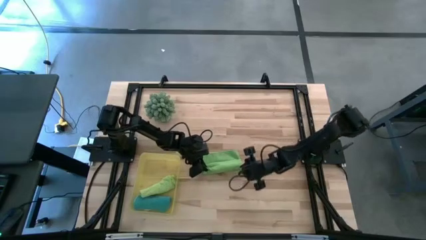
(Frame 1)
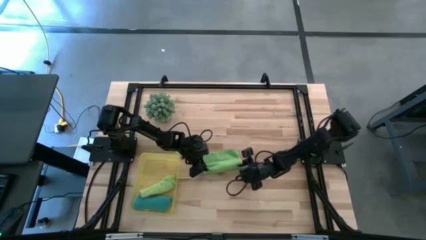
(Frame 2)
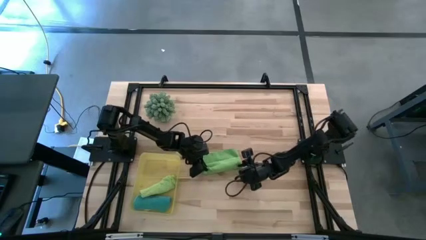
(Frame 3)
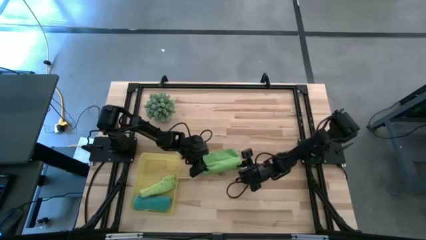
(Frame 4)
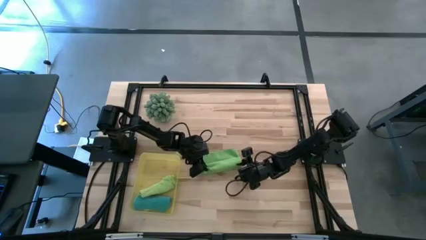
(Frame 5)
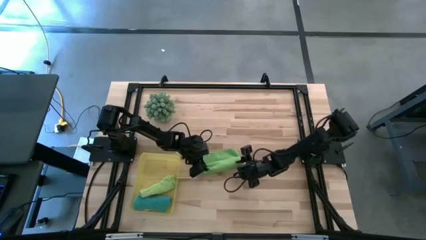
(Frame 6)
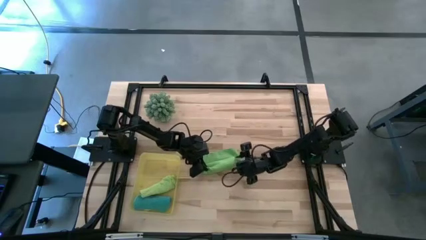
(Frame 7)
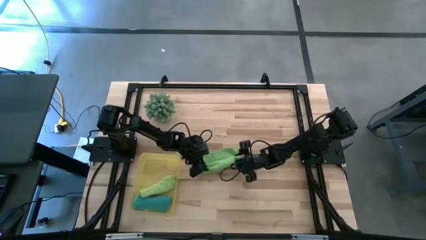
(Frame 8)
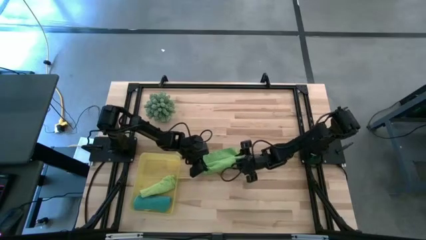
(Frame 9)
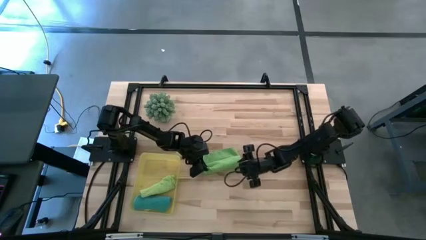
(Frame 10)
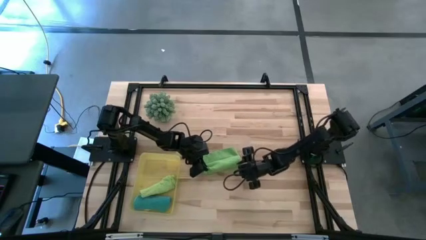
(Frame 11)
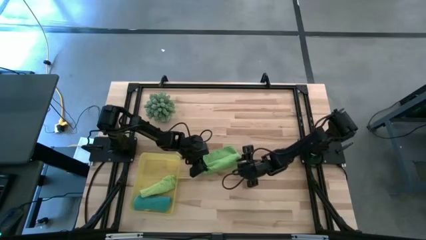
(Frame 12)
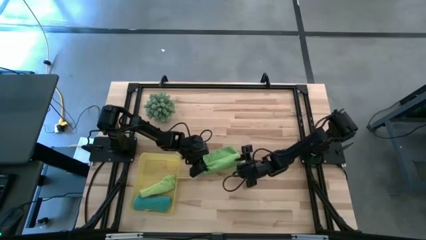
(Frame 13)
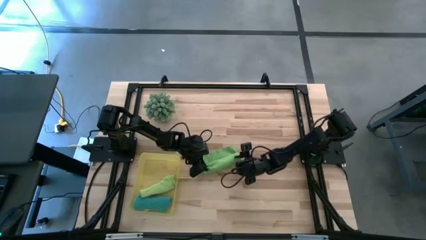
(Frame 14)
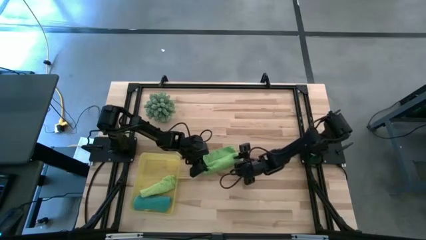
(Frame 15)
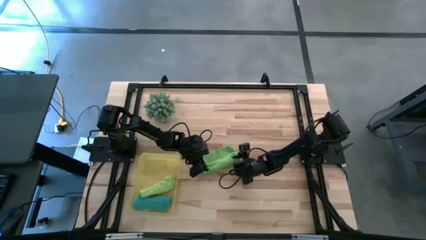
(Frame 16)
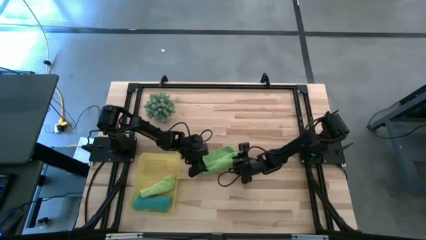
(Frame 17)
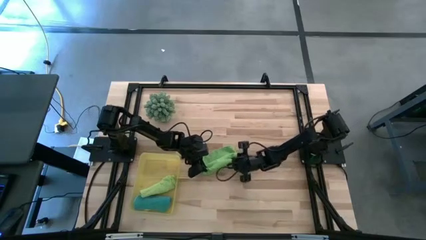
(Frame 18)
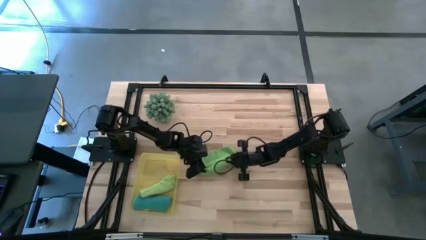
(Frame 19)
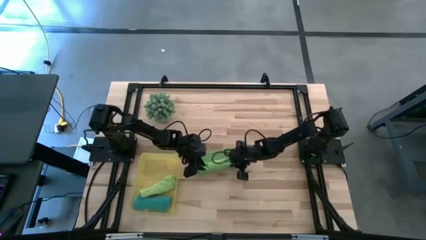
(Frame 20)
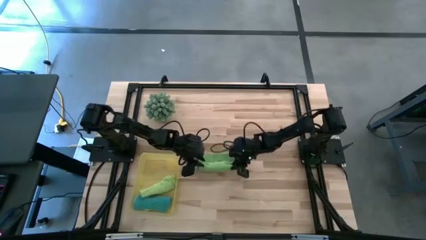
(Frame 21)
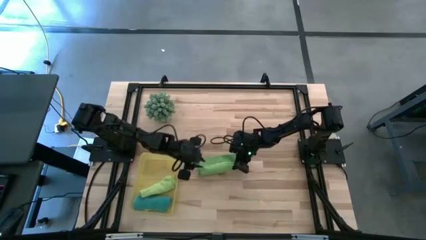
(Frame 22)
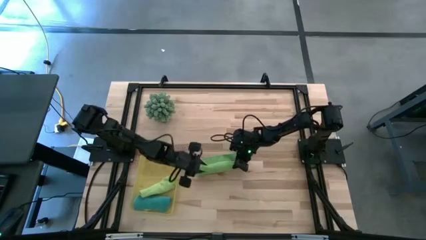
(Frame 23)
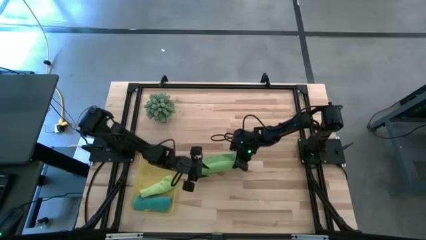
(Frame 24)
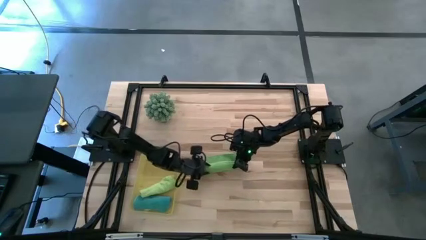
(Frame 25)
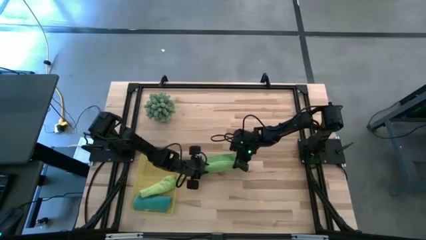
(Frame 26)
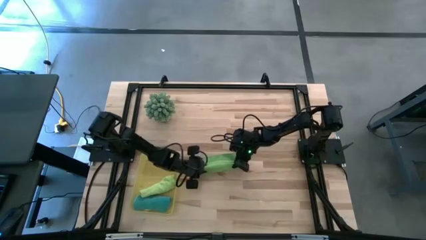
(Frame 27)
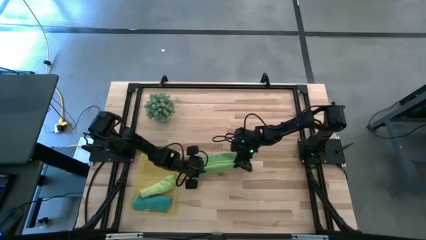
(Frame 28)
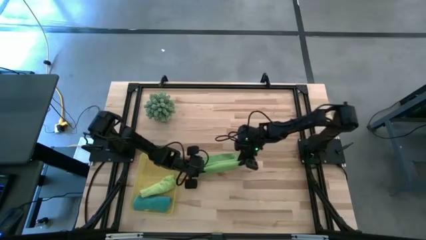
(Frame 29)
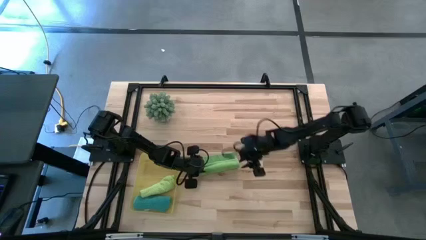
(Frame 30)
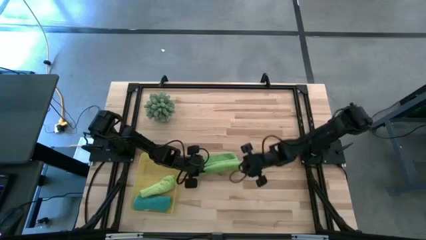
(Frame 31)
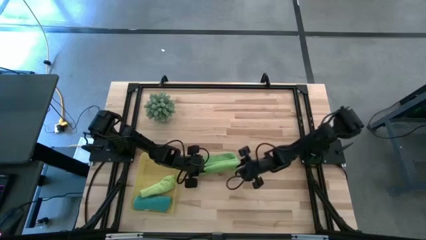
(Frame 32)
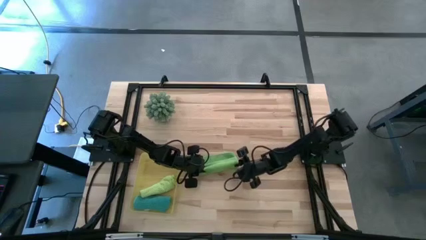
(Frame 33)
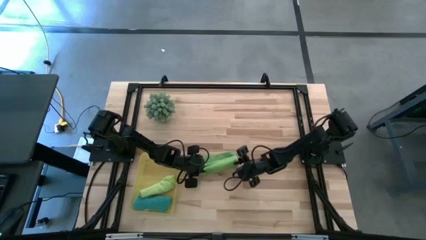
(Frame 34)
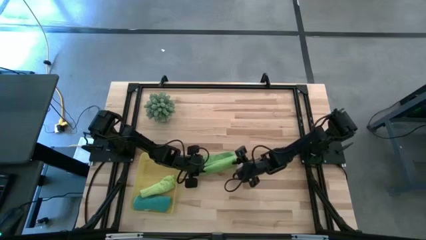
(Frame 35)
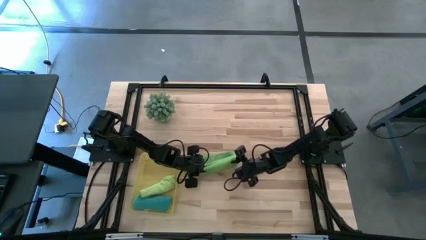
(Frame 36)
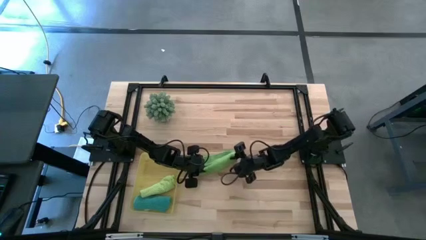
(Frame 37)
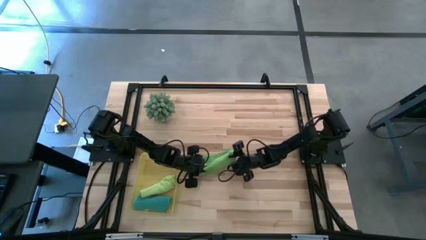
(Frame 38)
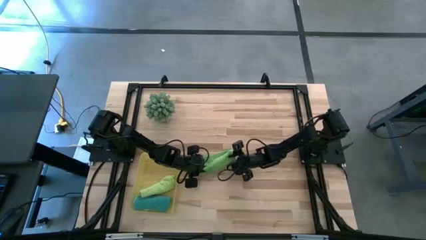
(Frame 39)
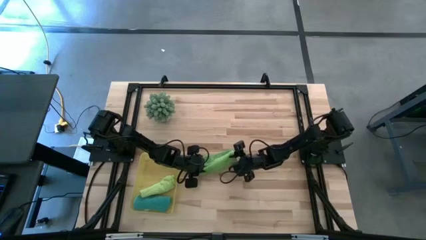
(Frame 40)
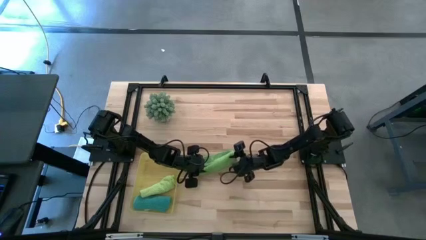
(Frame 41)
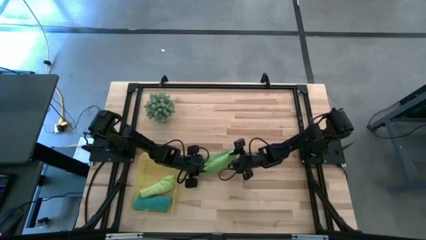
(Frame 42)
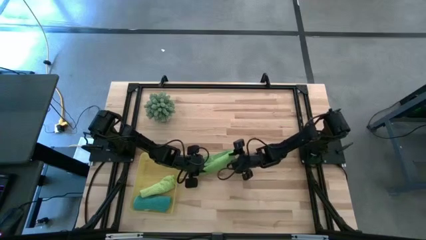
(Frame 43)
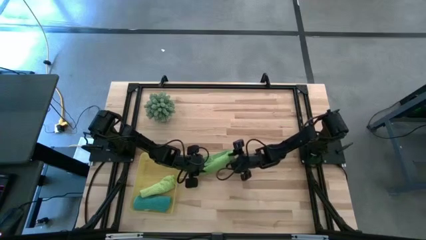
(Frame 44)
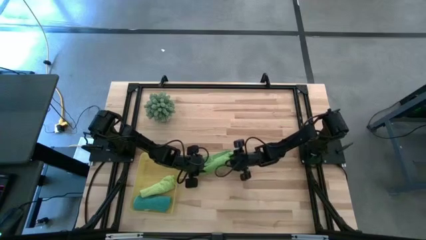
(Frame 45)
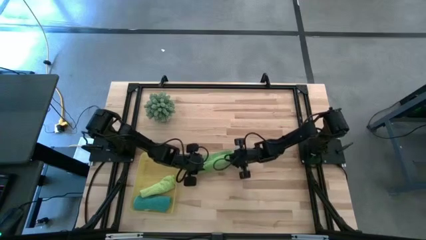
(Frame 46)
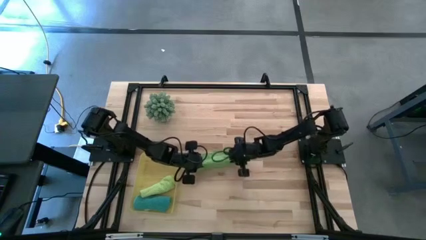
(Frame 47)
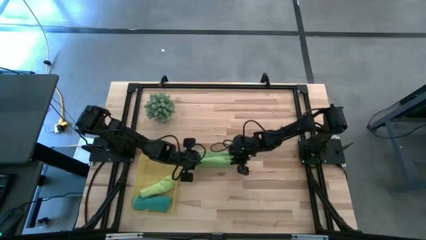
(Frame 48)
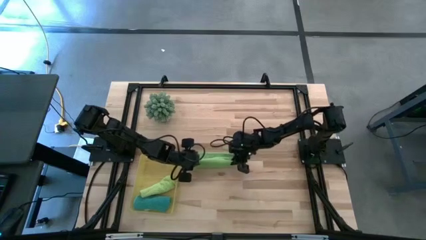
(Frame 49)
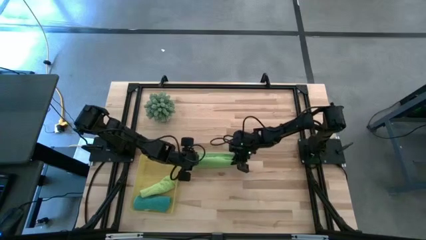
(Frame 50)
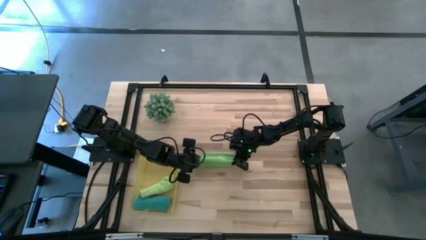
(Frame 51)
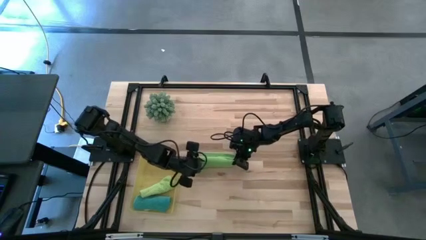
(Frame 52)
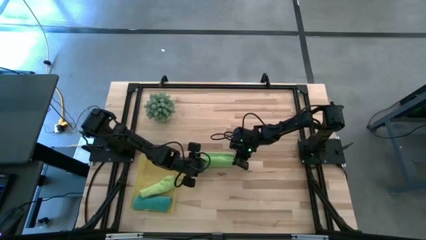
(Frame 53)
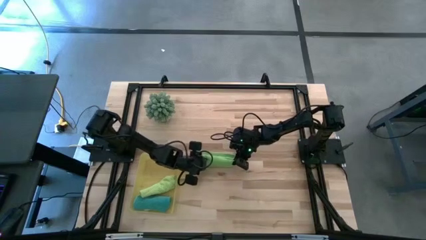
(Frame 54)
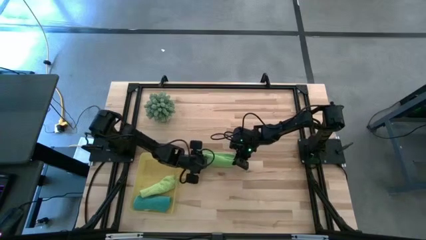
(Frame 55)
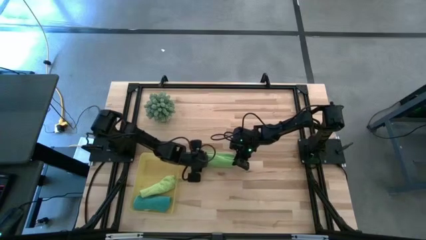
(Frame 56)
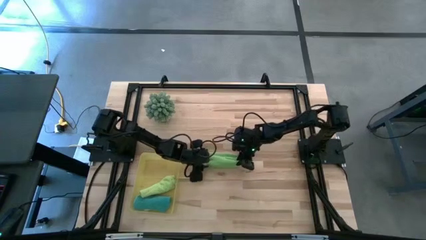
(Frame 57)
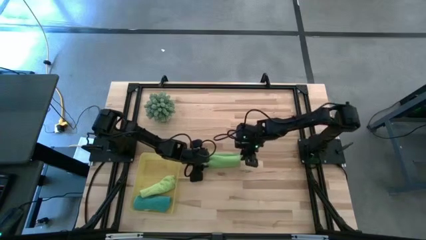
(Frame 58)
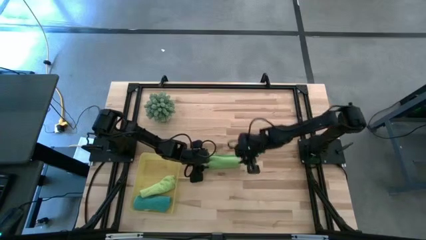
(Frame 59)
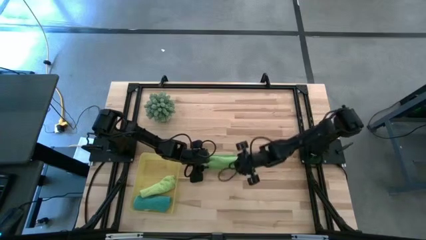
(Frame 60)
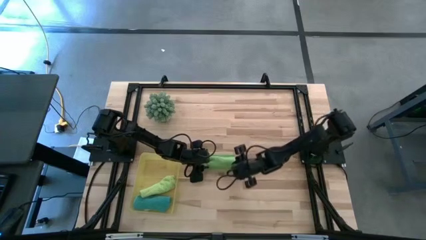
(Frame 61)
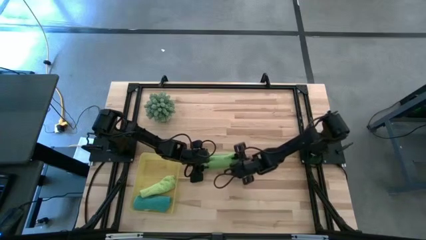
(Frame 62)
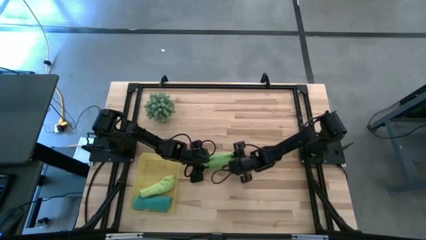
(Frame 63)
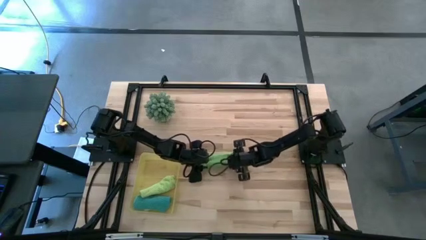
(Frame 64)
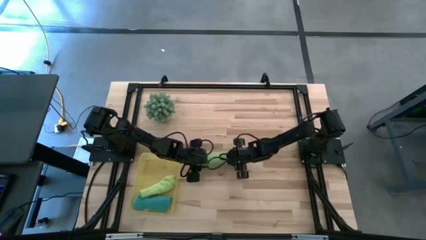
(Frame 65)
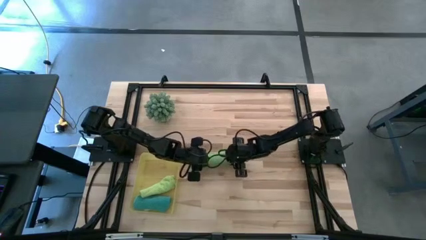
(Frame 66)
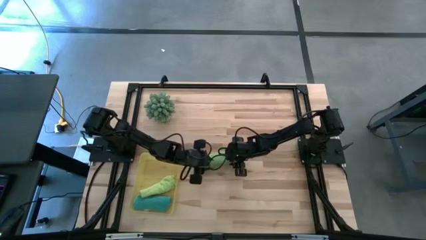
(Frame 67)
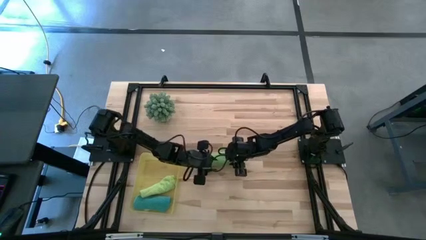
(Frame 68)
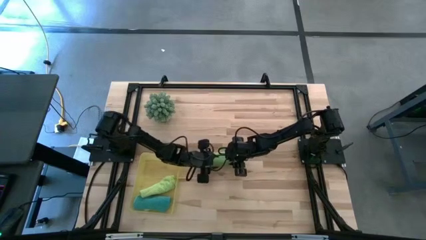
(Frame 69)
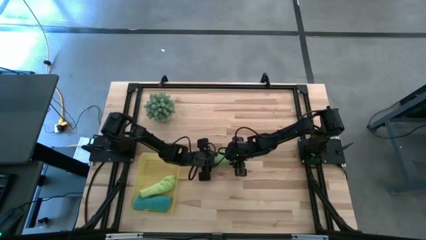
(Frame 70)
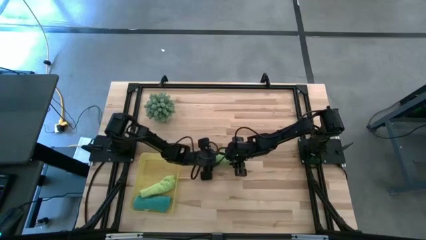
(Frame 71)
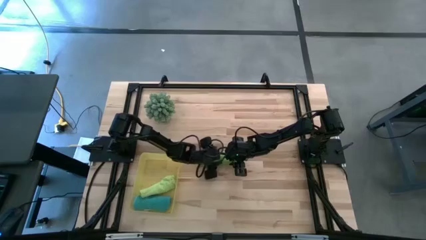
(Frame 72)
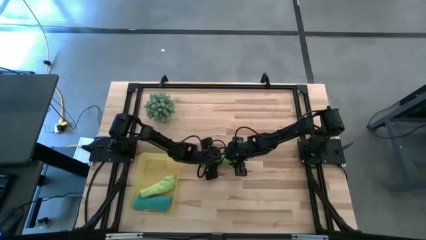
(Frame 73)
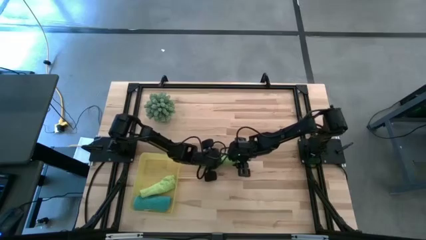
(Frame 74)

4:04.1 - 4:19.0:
Task: Roll microfiber towels into tight, uniform cylinder then place into a basket
Roll the green towel

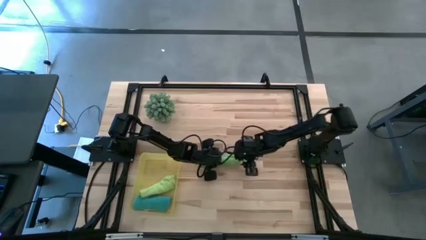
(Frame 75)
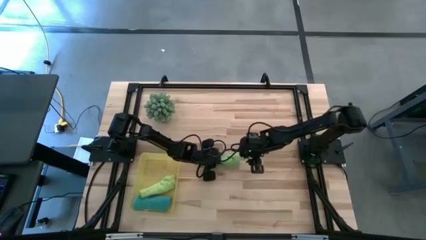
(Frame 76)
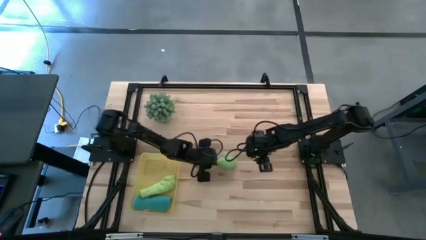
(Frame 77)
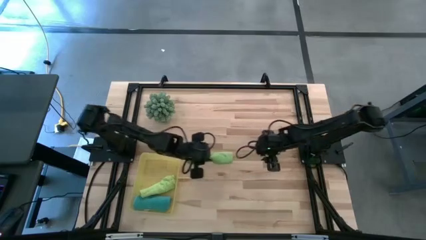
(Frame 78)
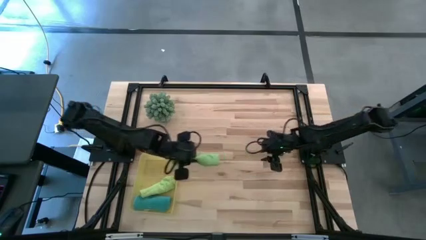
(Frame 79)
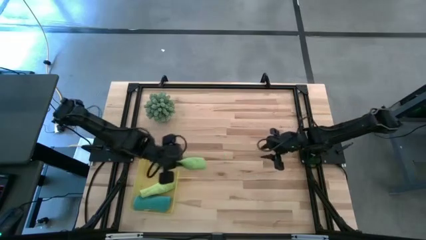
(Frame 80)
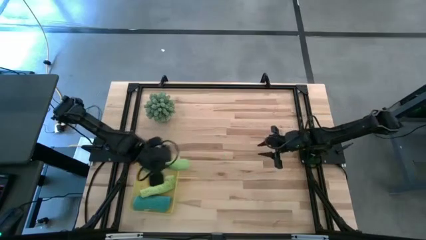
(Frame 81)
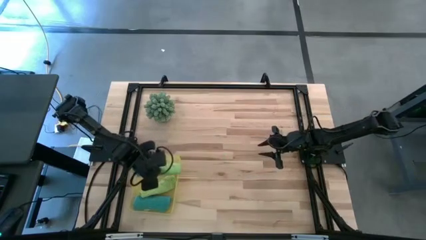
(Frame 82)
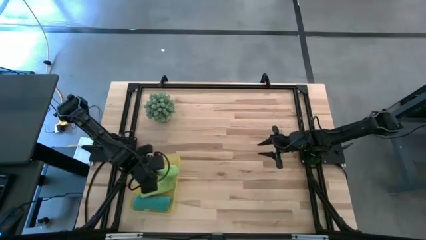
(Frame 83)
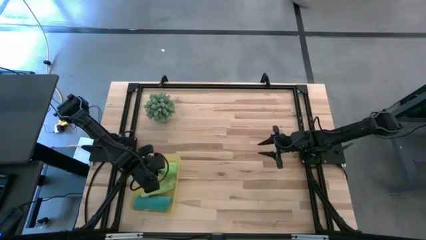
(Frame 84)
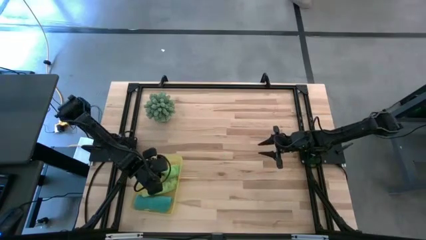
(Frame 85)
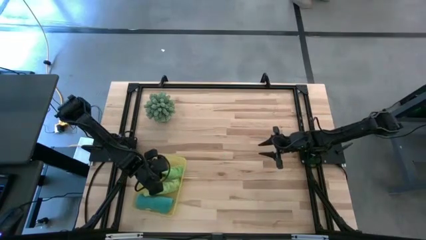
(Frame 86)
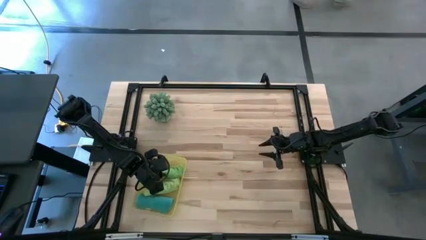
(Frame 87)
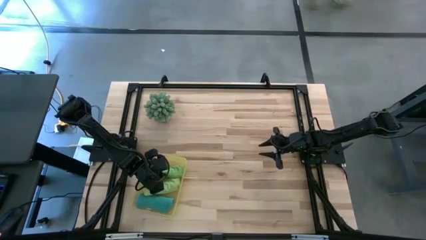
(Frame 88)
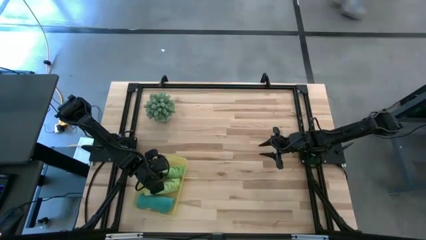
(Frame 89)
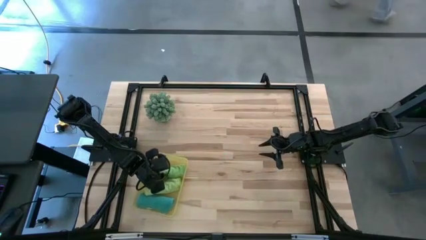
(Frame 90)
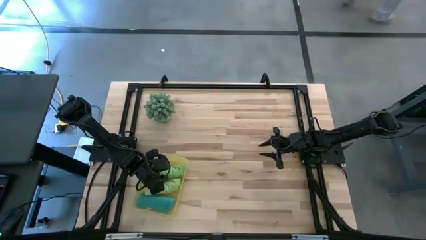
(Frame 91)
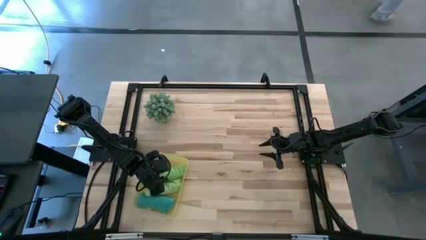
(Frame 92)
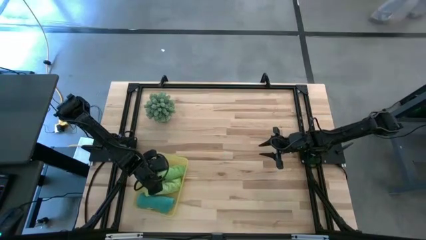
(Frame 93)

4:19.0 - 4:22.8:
Put the green towel into the yellow bin
